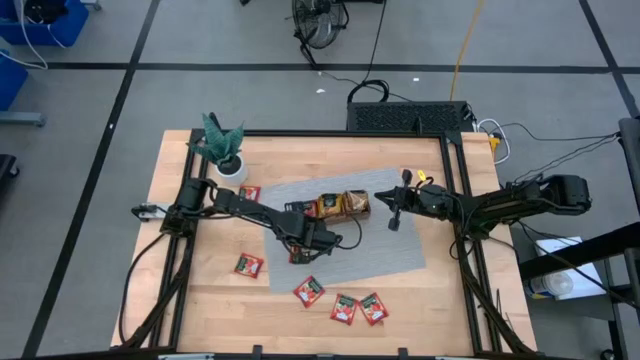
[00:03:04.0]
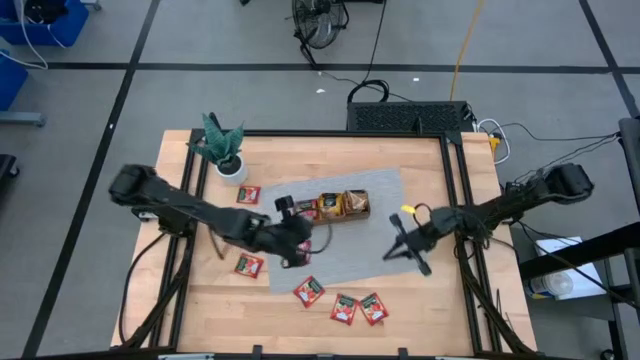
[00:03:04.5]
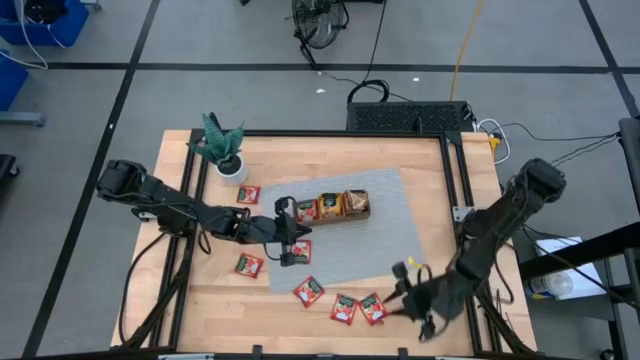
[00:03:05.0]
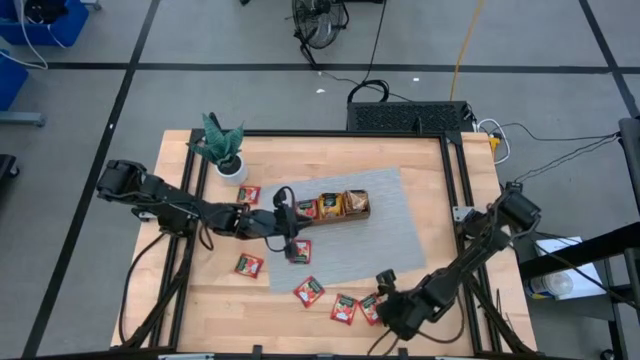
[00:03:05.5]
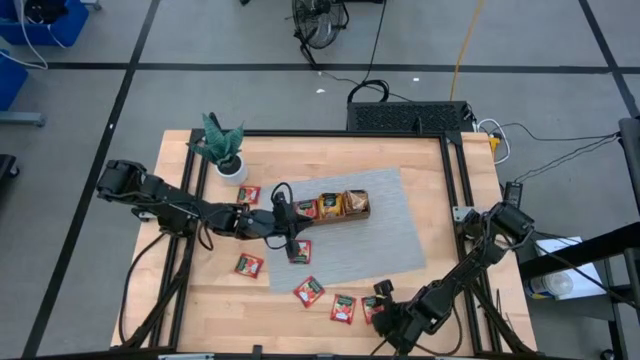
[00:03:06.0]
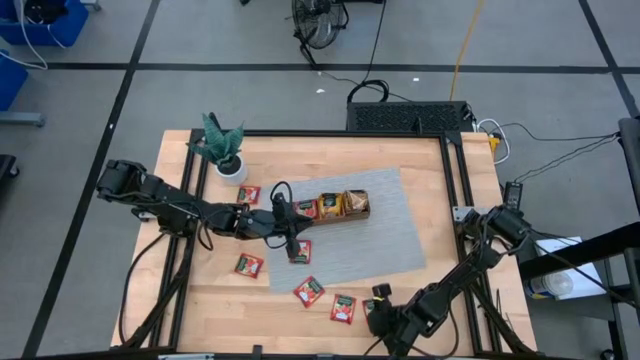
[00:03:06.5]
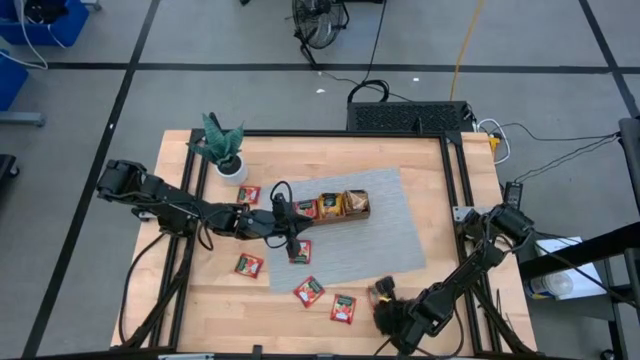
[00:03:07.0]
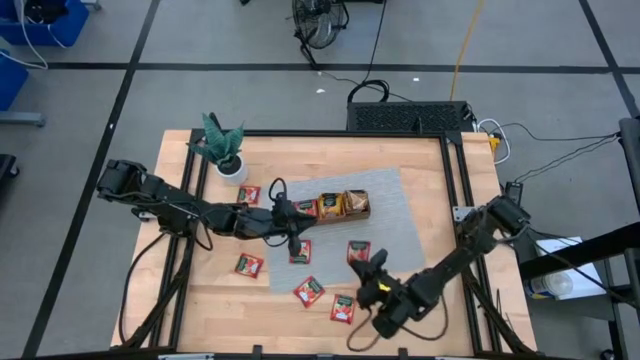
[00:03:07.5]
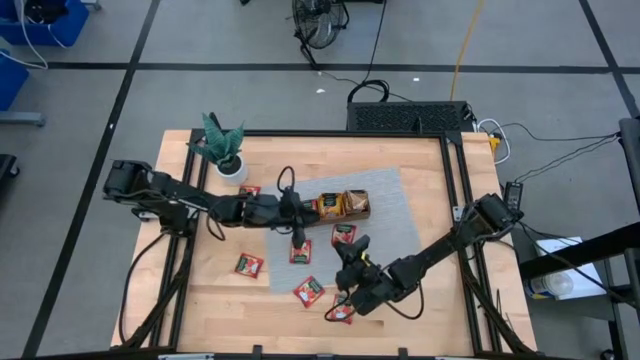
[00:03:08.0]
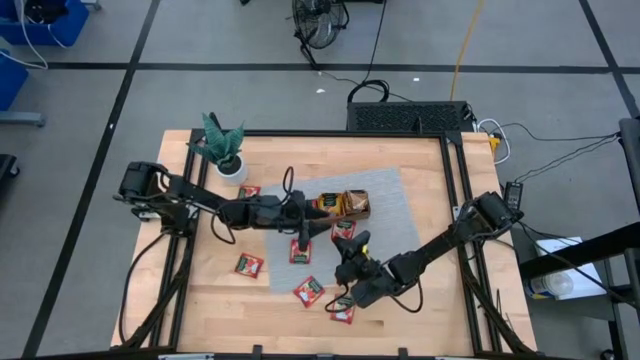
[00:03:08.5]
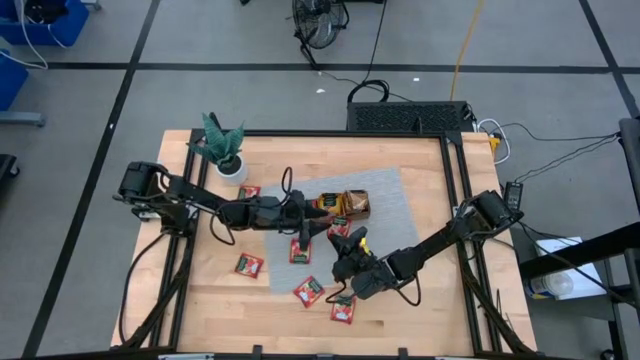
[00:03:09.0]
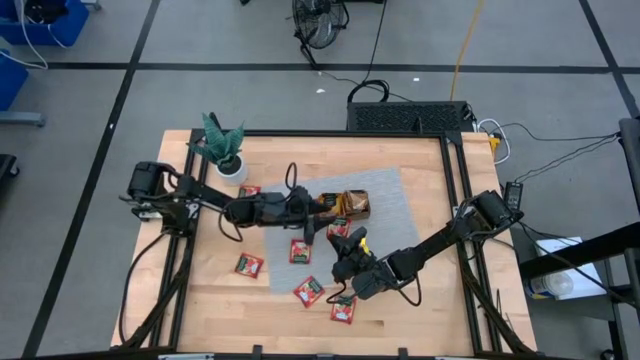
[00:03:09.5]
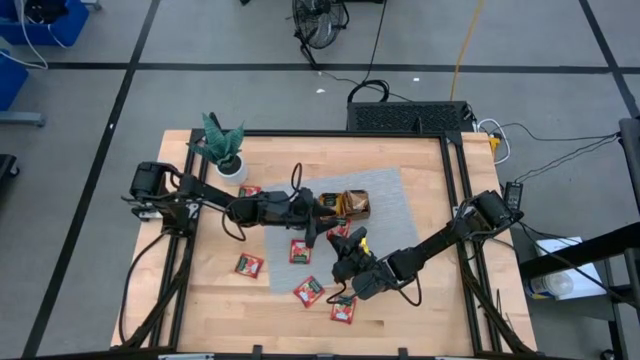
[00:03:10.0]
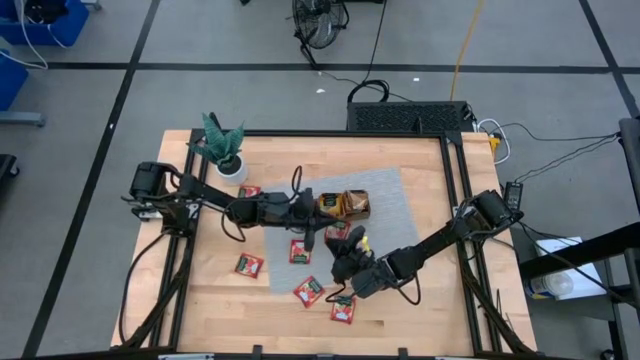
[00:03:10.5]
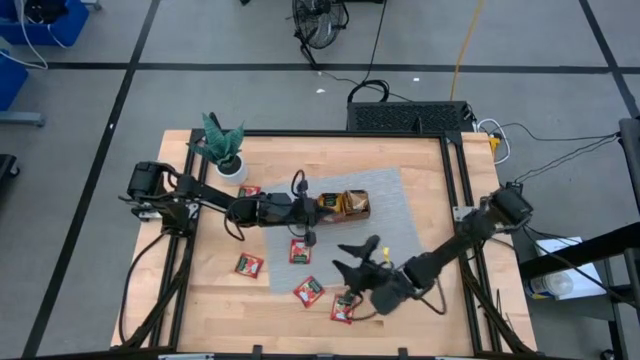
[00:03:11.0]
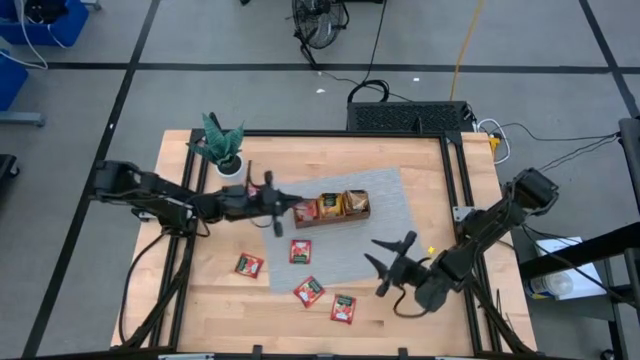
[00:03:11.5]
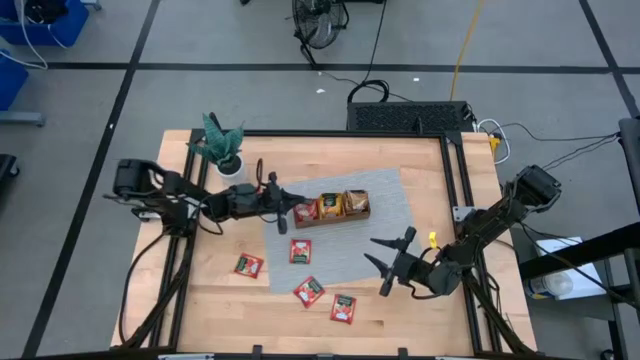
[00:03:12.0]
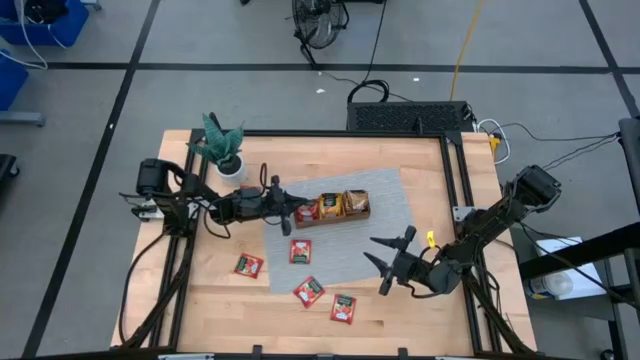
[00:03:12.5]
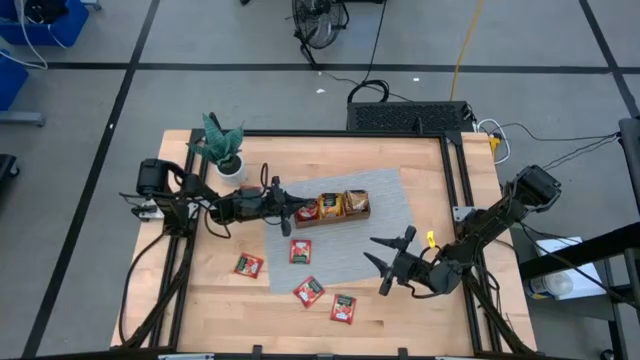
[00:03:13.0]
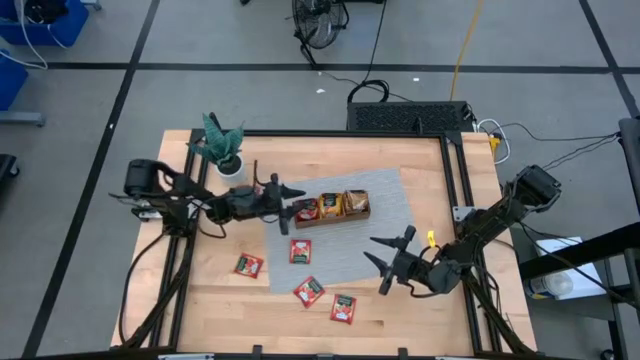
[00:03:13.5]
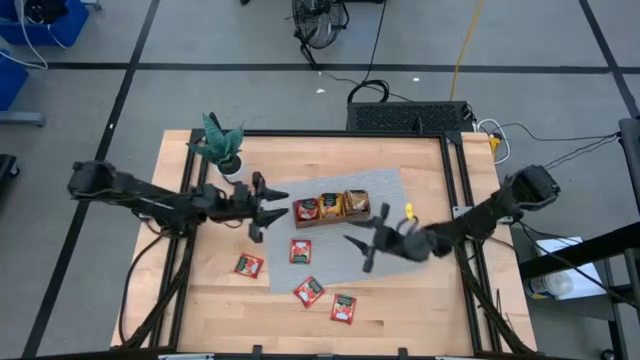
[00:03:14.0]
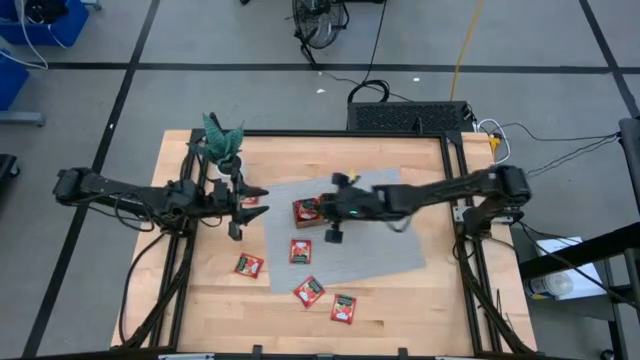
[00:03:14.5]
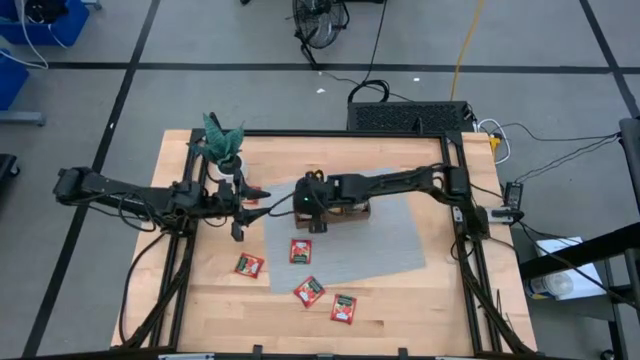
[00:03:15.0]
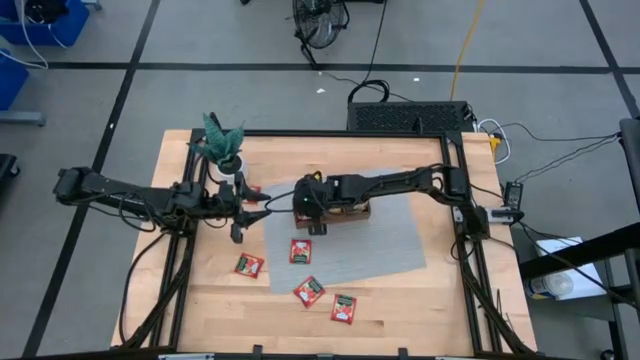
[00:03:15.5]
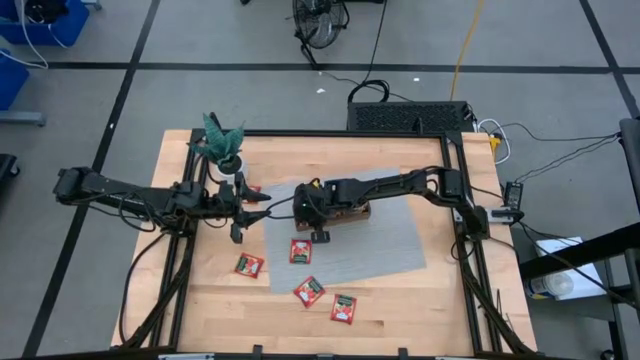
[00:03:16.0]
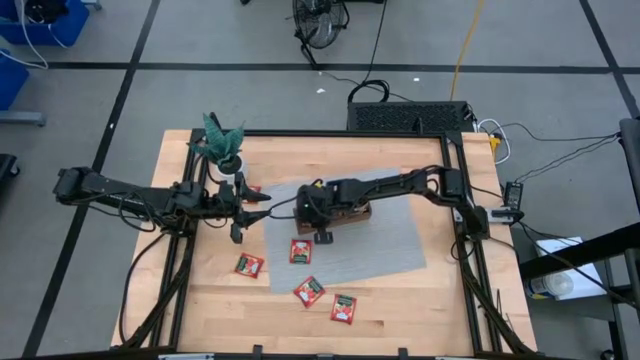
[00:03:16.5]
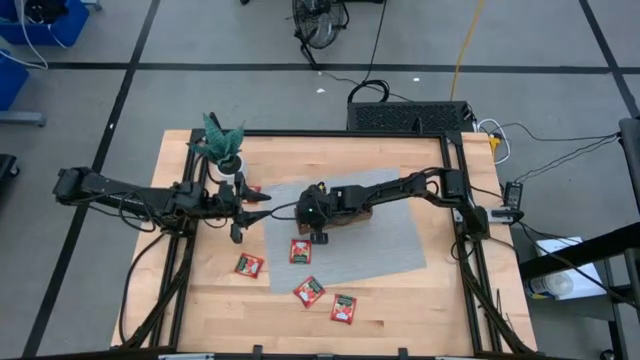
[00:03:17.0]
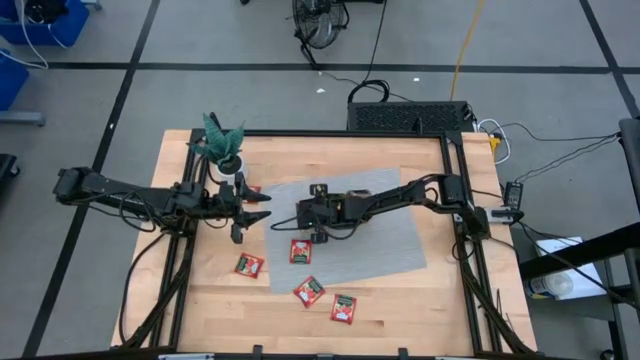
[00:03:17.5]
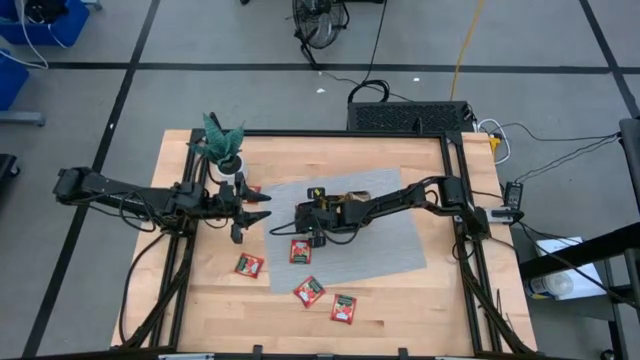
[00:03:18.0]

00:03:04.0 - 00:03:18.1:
Task: Pick & Place Tea
Put the red tea into the left part of the wooden organizer

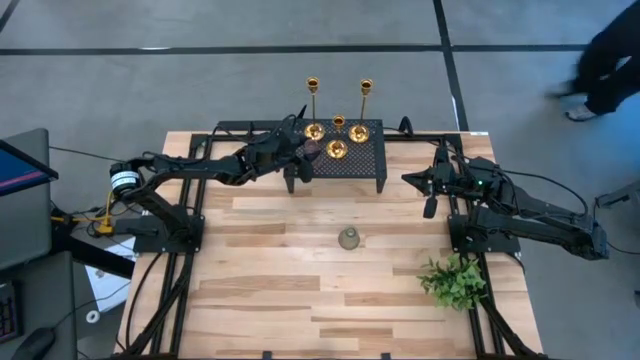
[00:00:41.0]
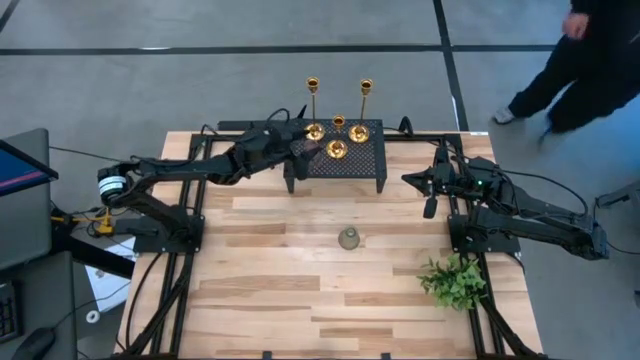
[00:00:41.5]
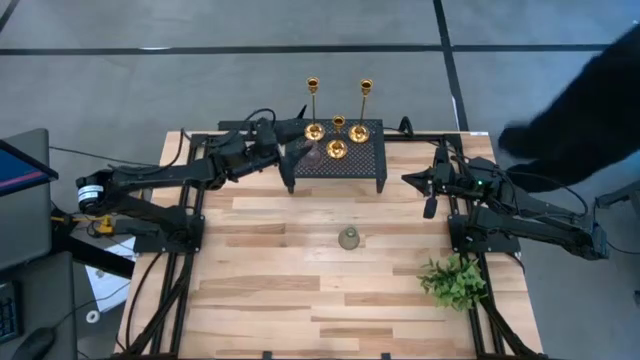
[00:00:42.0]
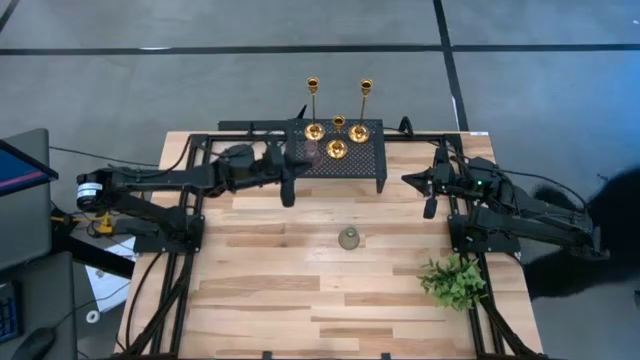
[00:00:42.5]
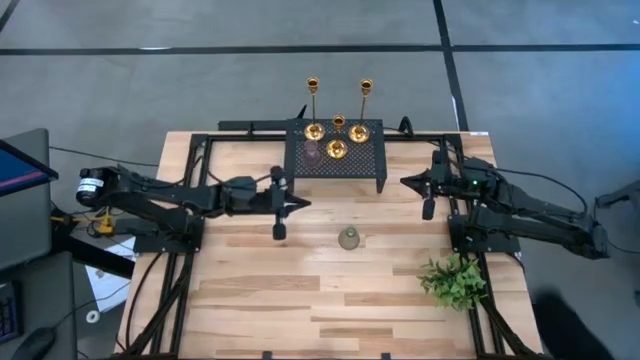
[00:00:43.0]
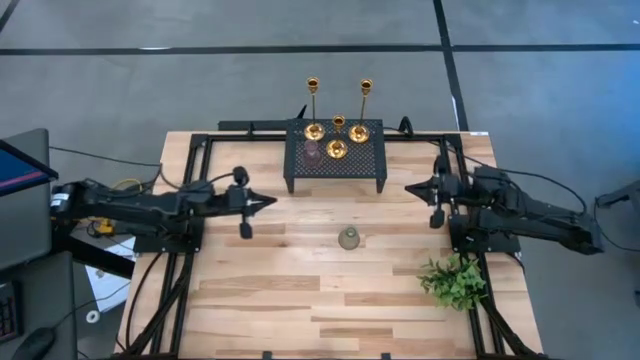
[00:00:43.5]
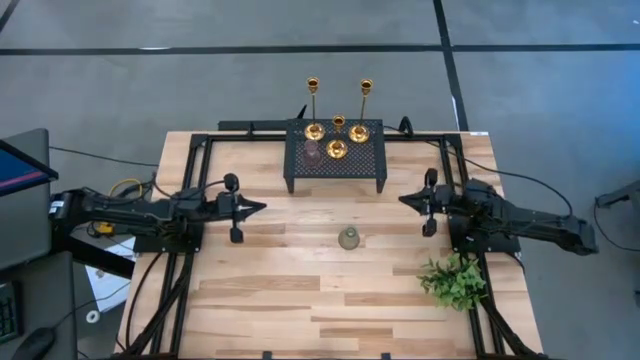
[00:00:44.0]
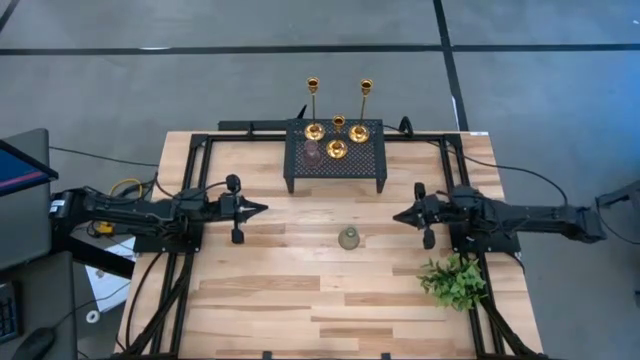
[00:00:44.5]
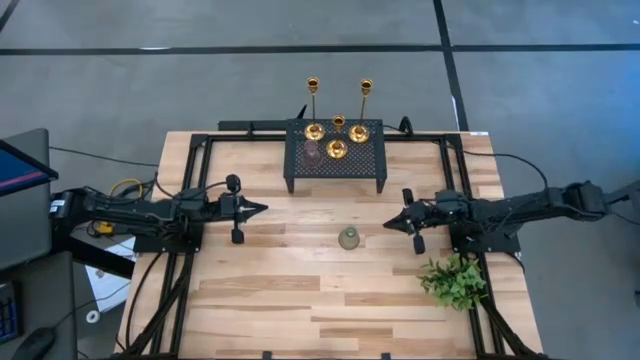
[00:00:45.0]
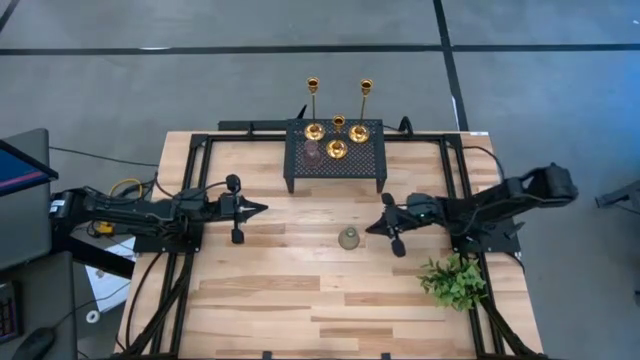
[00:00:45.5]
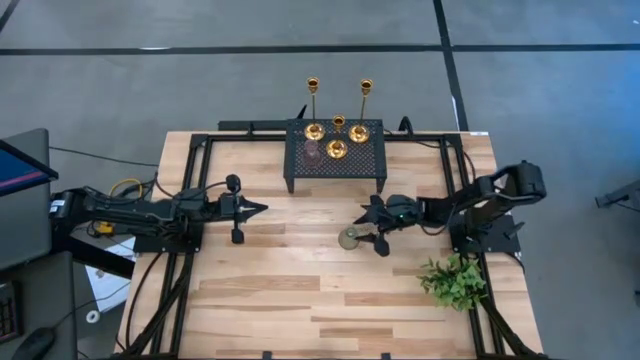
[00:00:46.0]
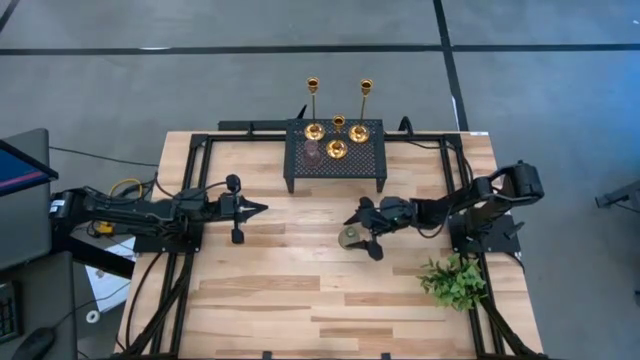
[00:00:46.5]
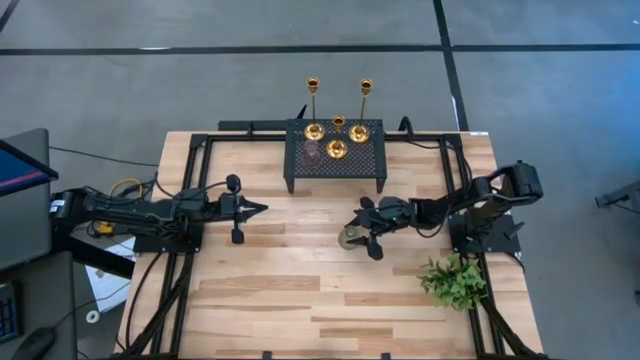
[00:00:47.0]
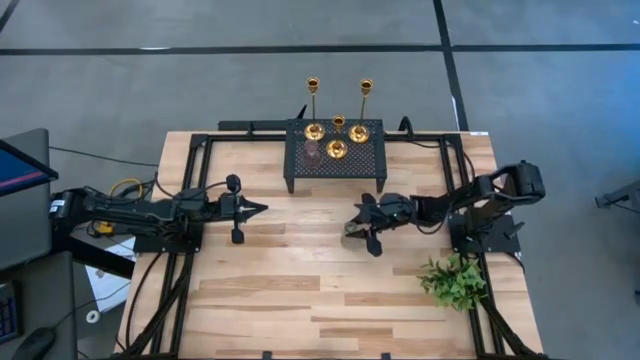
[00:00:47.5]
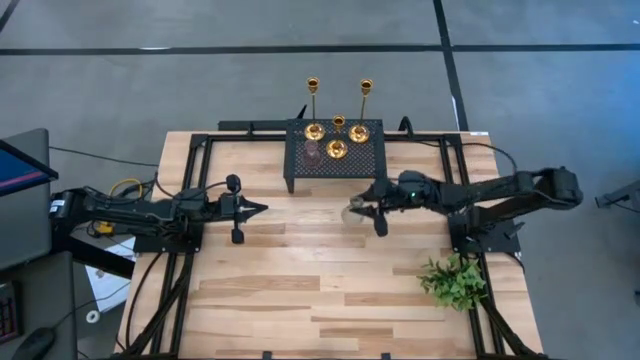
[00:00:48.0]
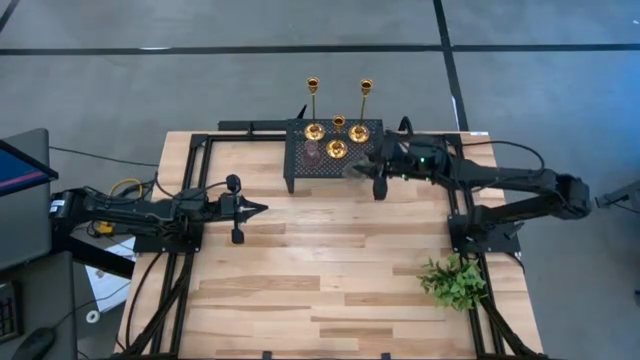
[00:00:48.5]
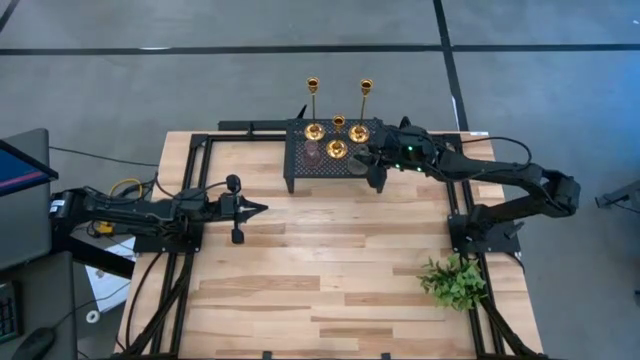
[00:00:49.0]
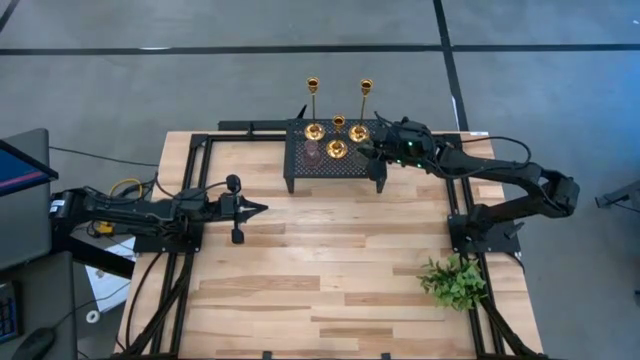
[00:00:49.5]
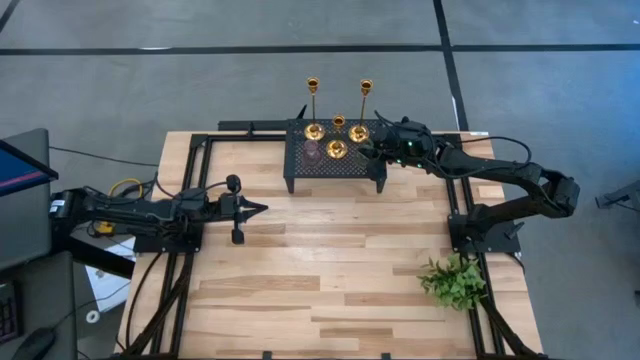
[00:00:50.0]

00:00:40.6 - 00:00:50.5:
Task: Pick & Place candle stick holders
Put the green glass candle holder on the shelf
